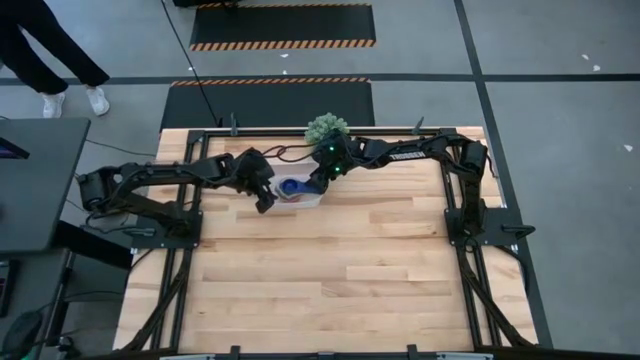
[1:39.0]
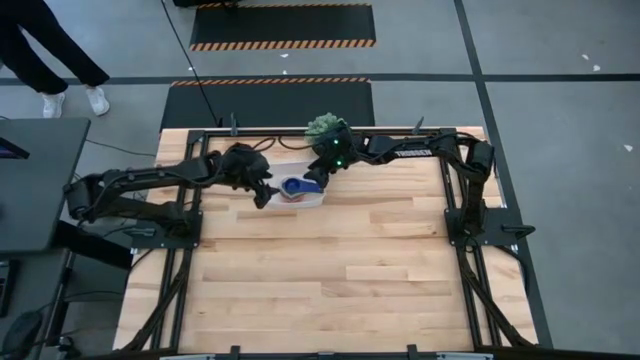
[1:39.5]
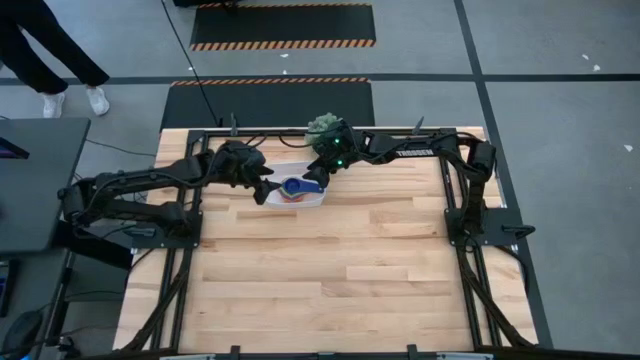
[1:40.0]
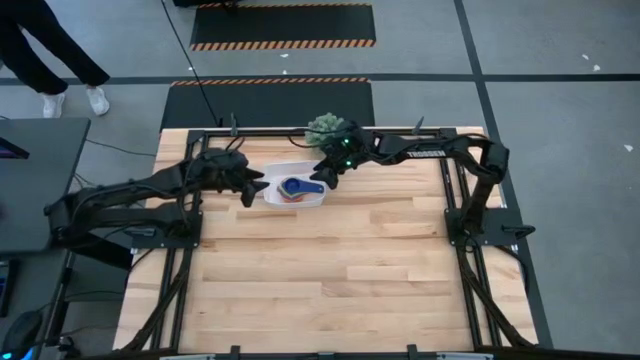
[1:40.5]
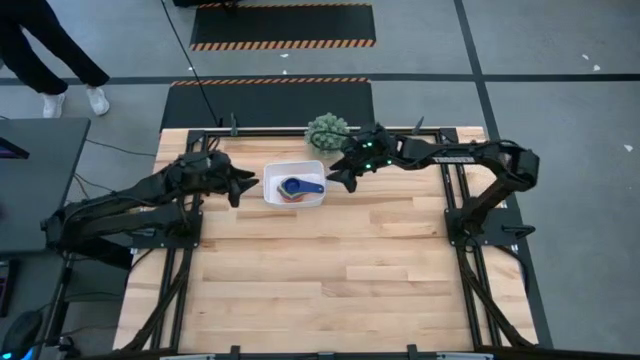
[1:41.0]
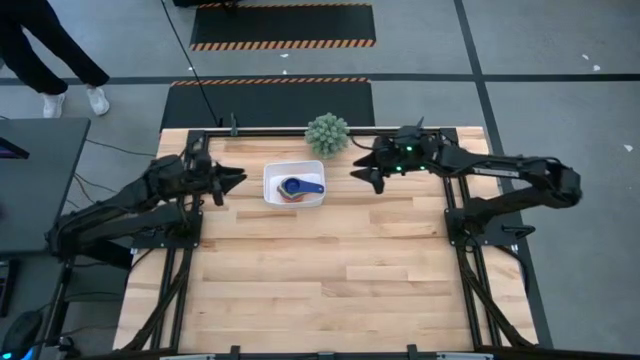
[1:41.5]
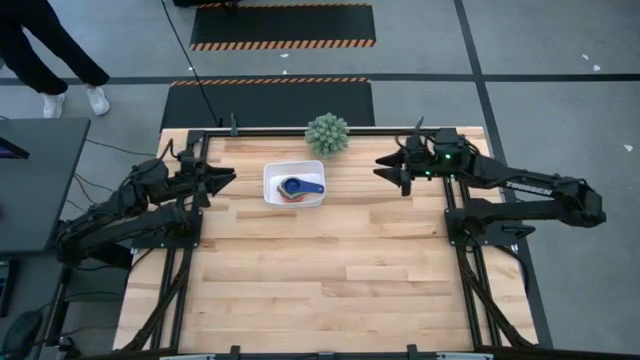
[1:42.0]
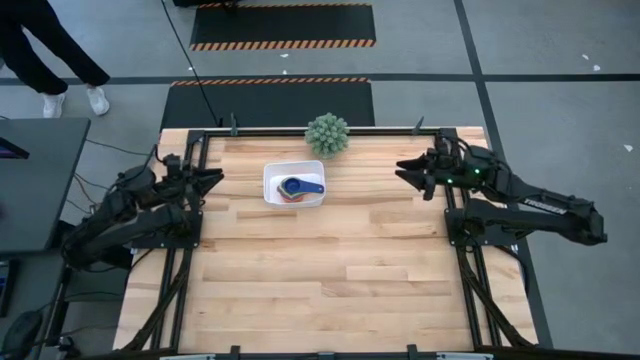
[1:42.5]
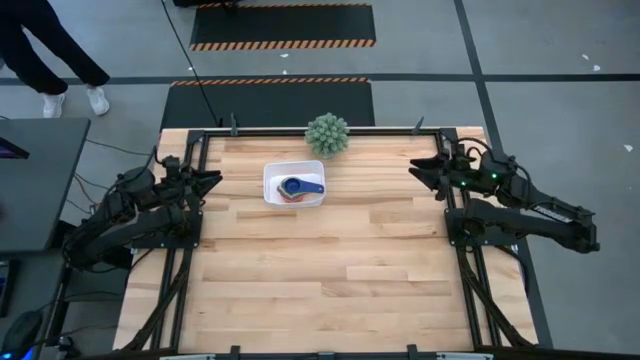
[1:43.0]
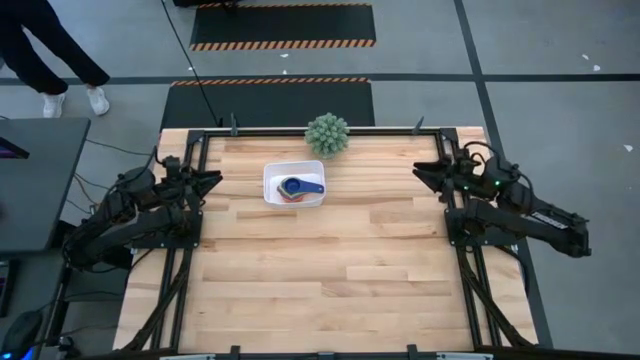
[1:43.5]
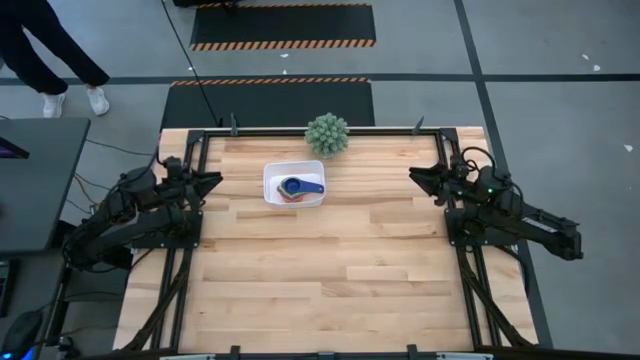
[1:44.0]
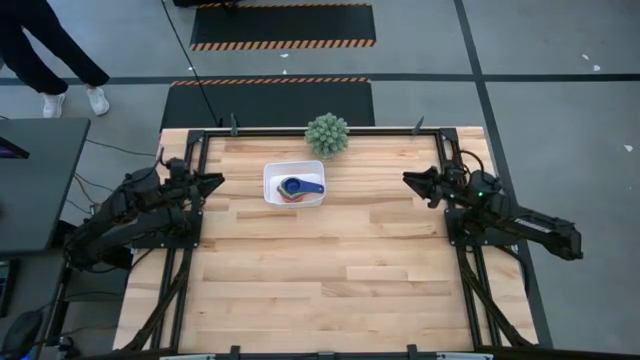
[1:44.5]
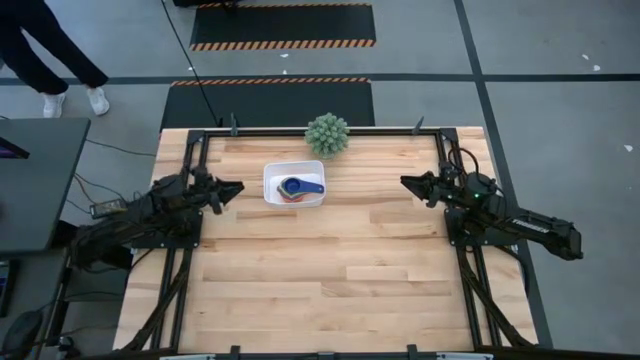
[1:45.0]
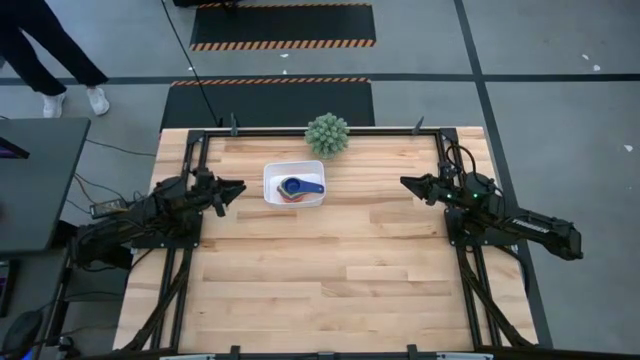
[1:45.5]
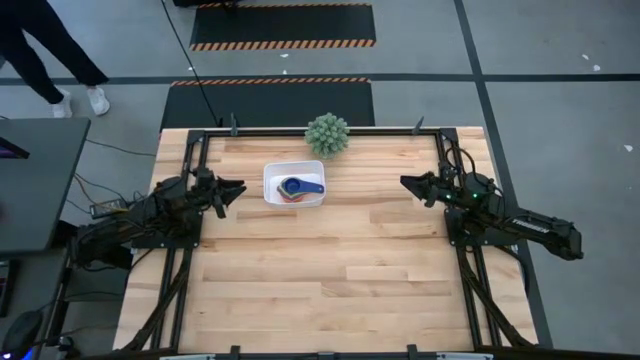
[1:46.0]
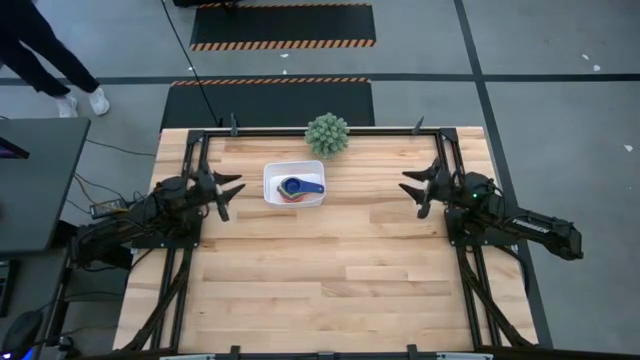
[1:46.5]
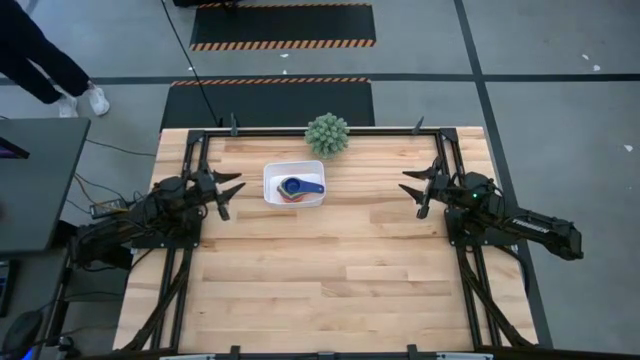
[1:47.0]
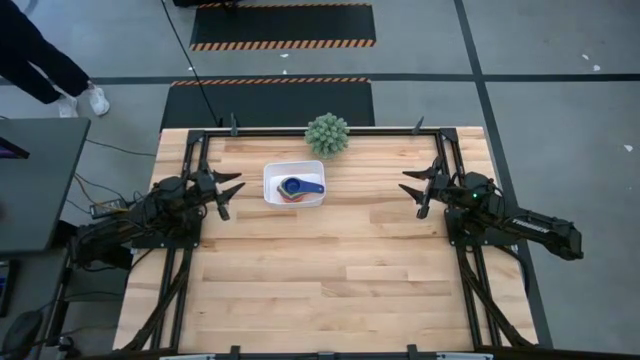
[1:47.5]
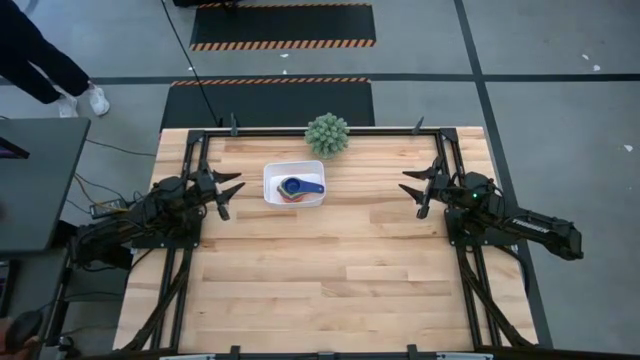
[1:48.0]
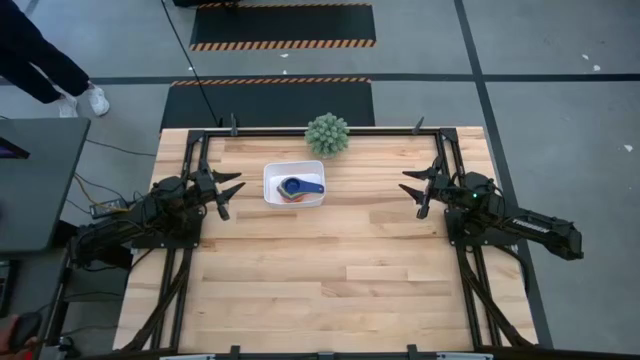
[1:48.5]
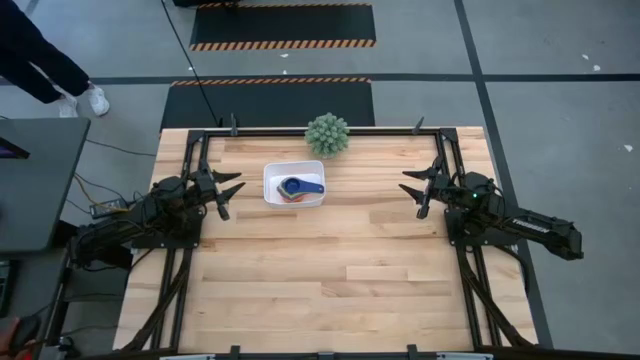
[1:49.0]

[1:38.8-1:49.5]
Task: Nest measuring cups in basket
Return to Home Position

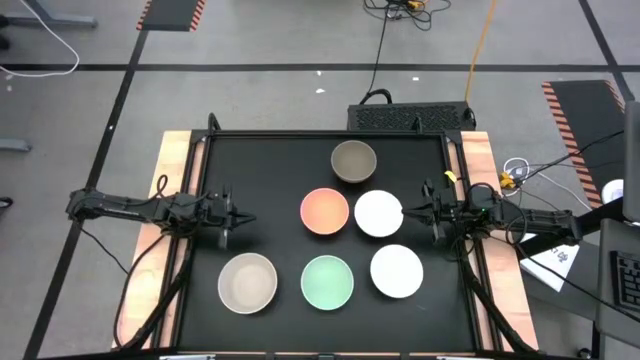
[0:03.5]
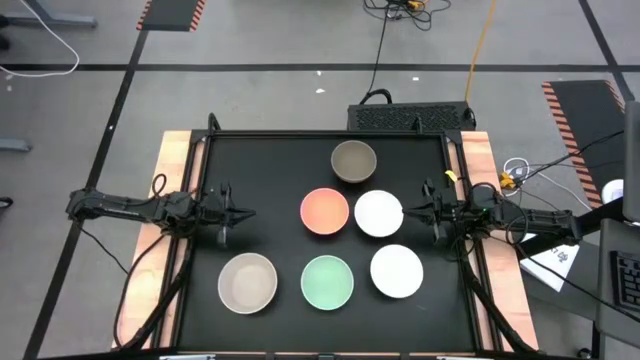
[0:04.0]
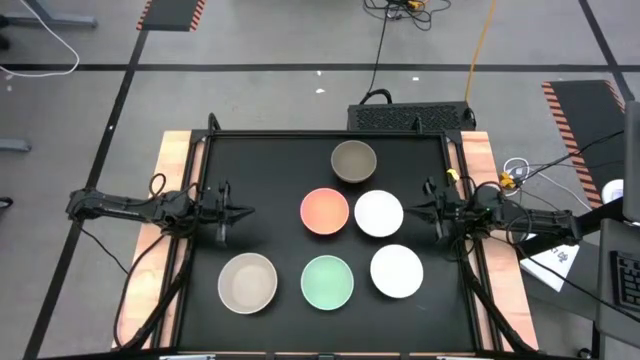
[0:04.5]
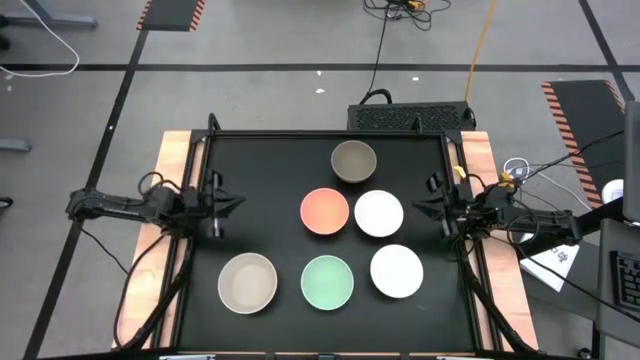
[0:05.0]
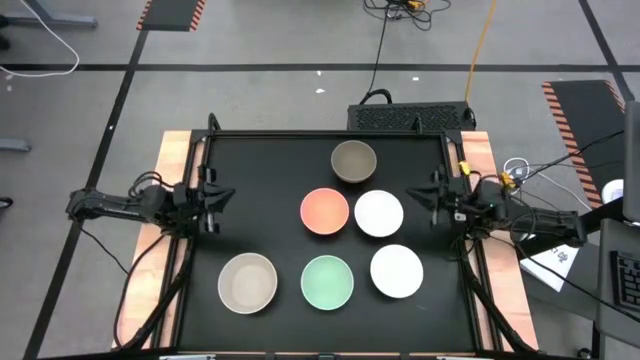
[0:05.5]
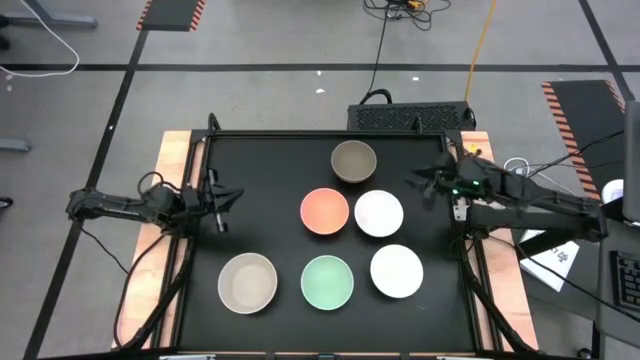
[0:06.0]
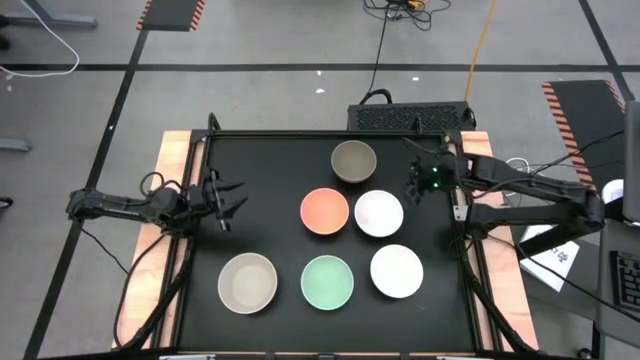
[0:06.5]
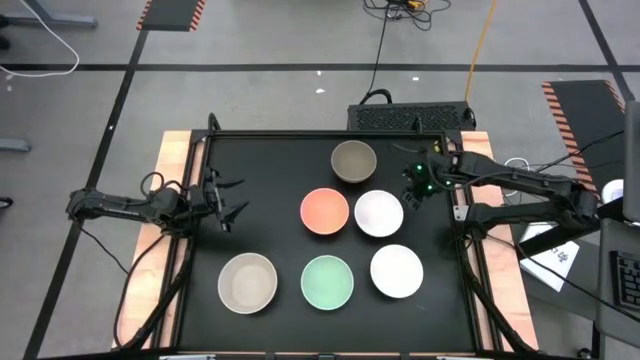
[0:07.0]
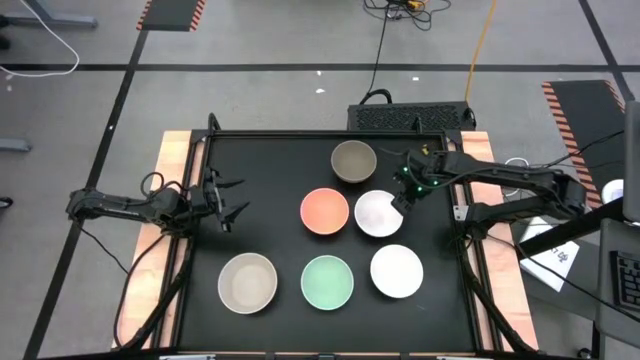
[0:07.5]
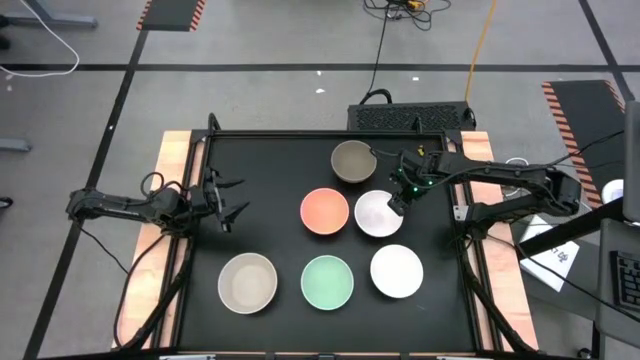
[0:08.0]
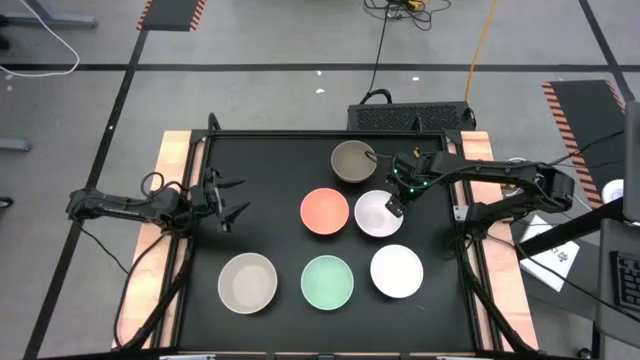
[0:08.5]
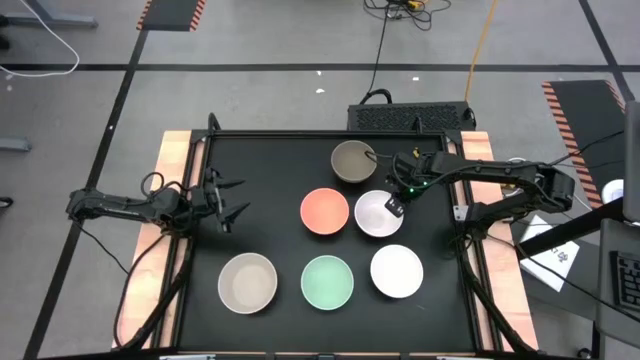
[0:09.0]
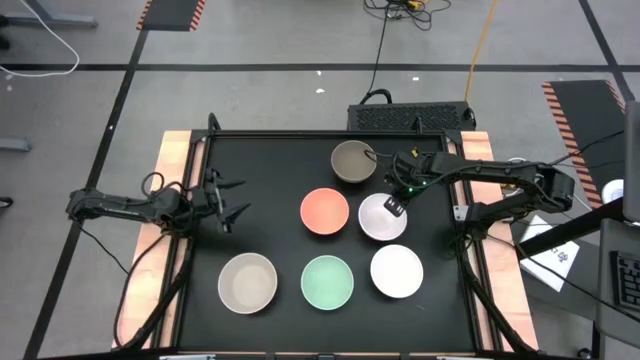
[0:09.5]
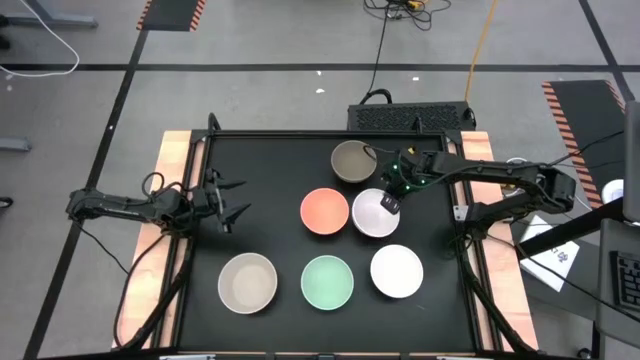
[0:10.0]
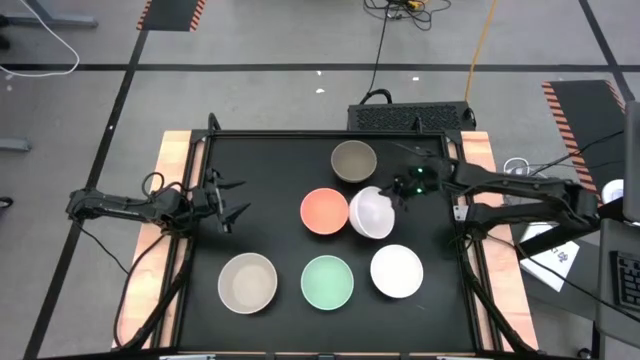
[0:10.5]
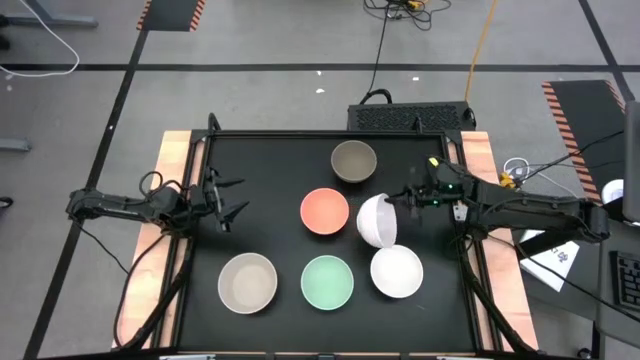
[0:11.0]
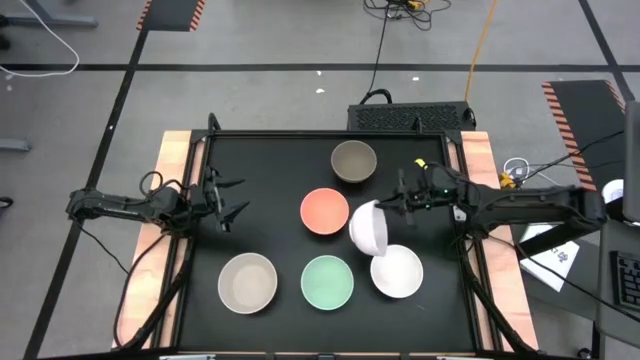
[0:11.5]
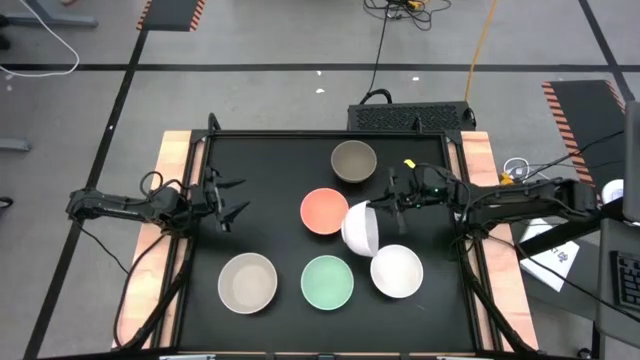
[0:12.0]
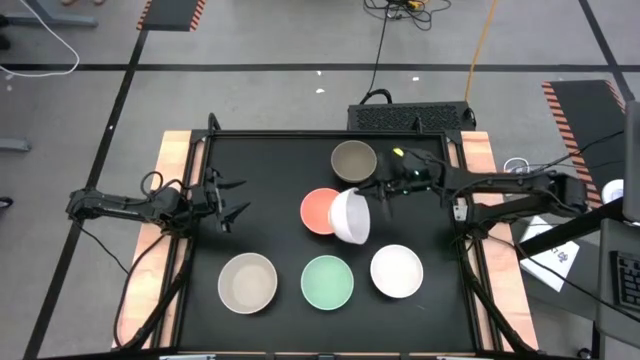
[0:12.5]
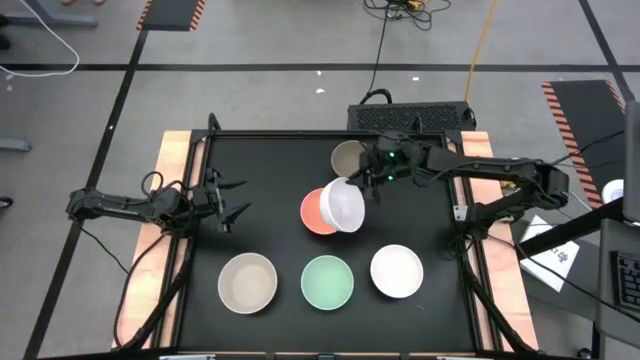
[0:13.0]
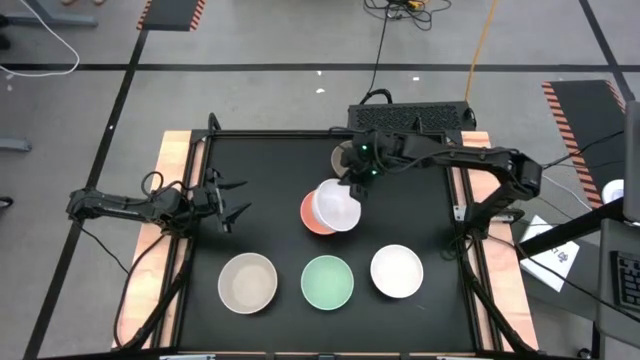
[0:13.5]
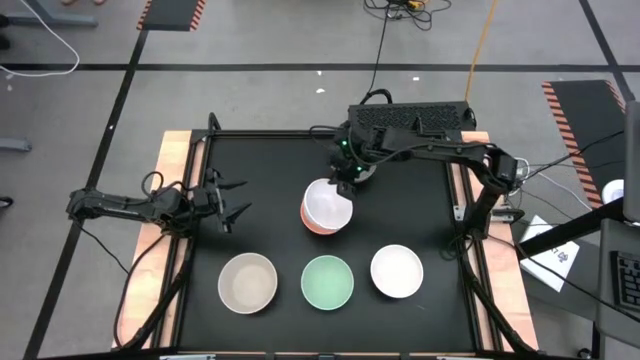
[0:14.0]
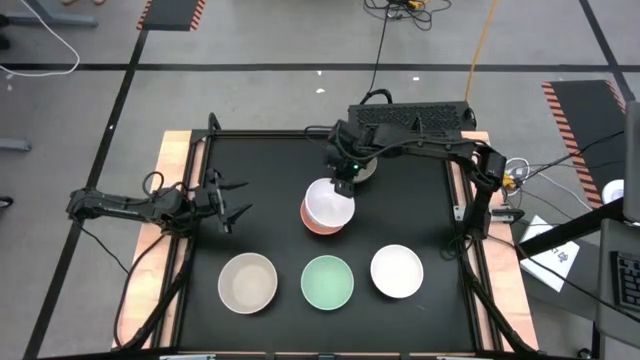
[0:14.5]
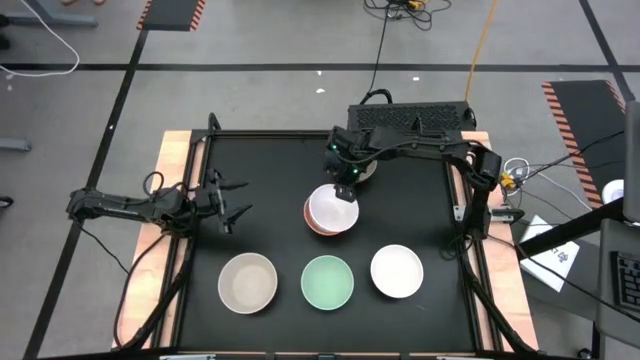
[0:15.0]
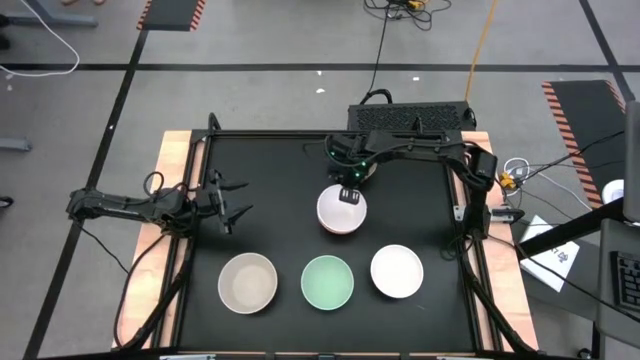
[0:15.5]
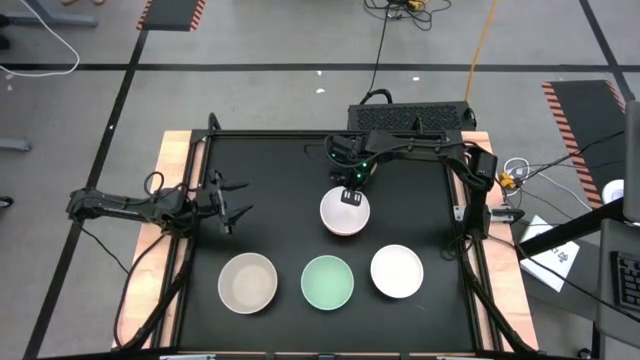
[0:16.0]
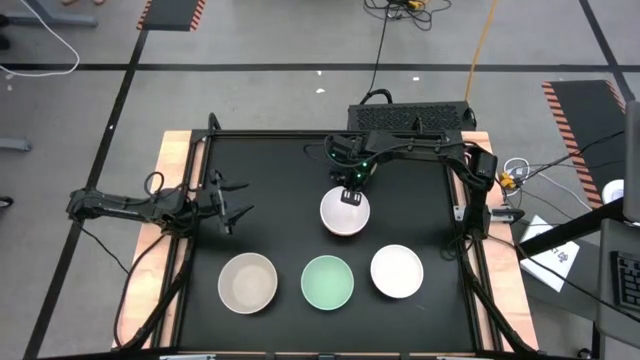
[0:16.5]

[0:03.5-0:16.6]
Task: Nest bowls inside each other
Stack the top white bowl on the orange bowl
